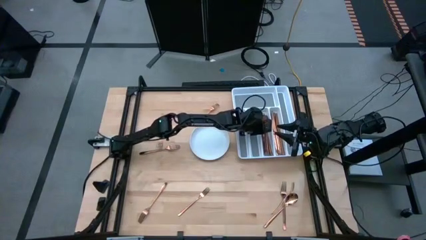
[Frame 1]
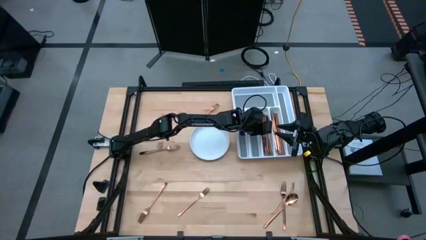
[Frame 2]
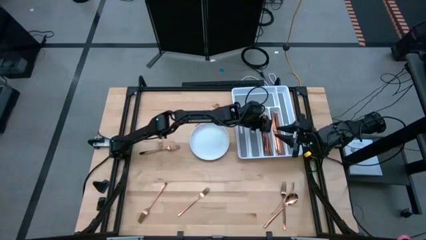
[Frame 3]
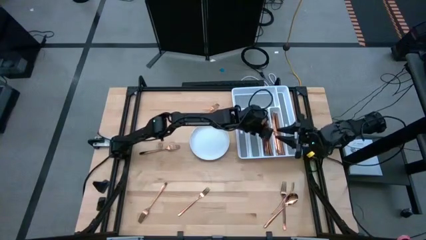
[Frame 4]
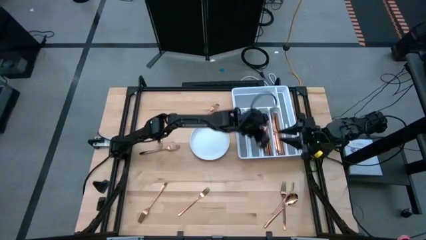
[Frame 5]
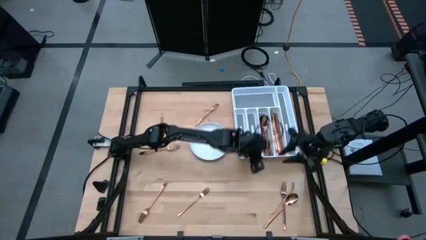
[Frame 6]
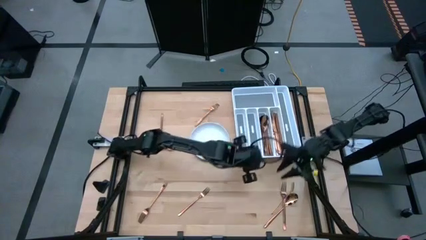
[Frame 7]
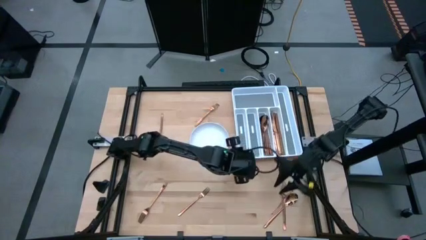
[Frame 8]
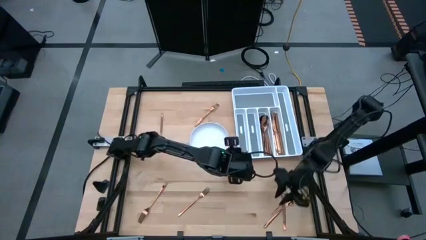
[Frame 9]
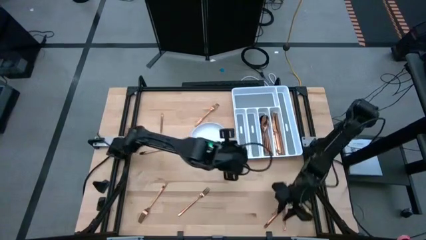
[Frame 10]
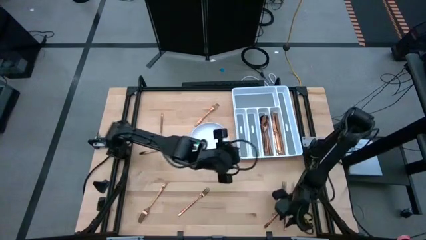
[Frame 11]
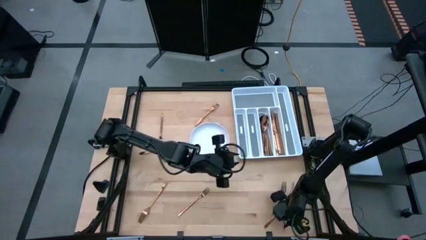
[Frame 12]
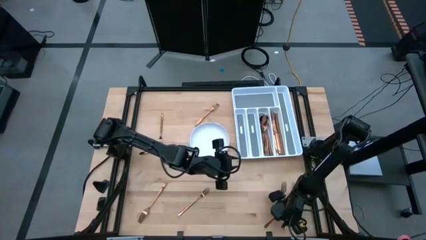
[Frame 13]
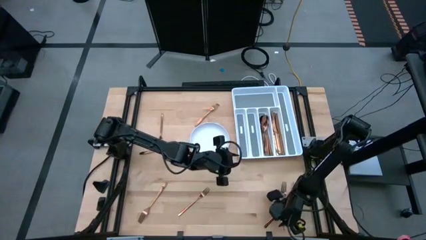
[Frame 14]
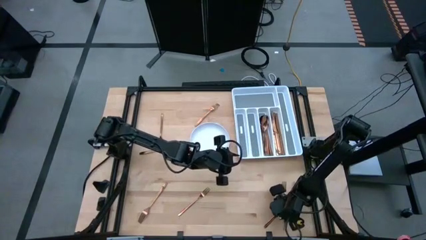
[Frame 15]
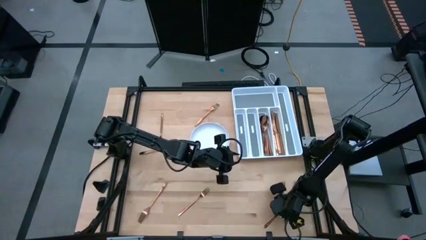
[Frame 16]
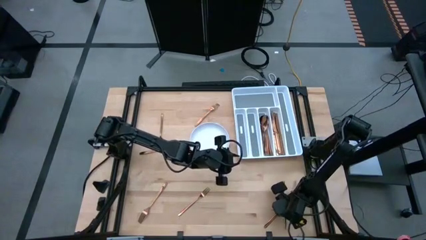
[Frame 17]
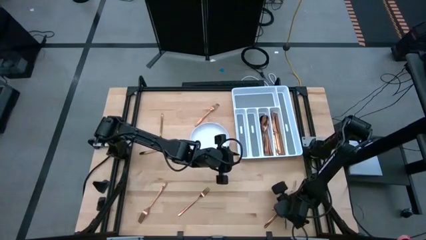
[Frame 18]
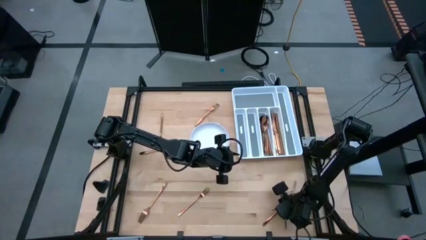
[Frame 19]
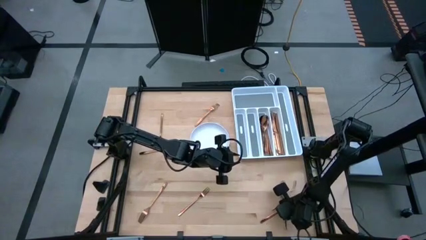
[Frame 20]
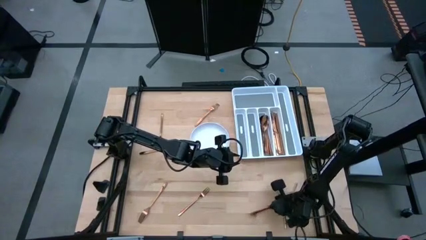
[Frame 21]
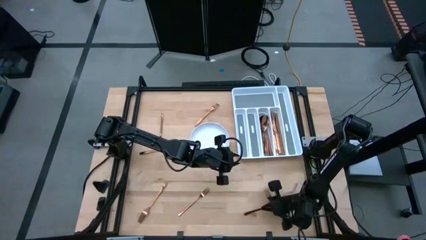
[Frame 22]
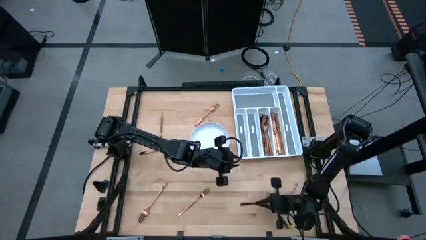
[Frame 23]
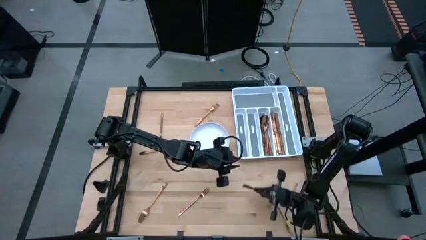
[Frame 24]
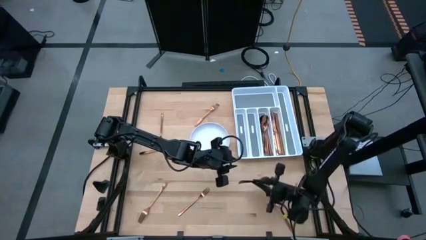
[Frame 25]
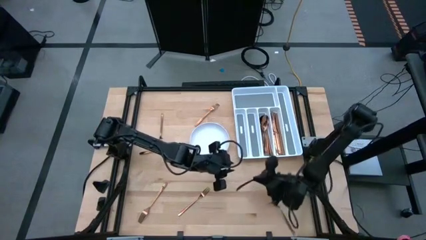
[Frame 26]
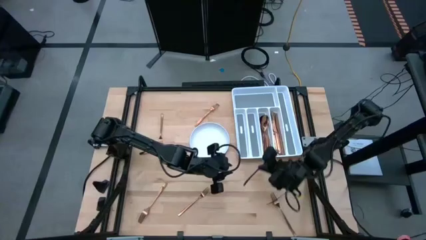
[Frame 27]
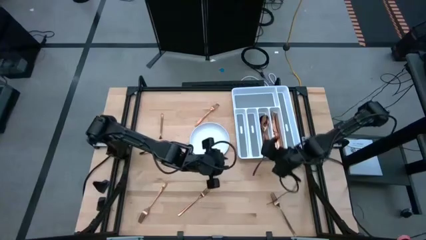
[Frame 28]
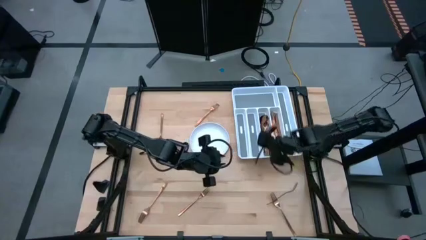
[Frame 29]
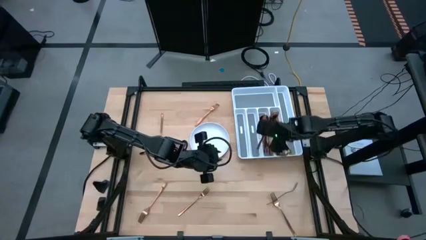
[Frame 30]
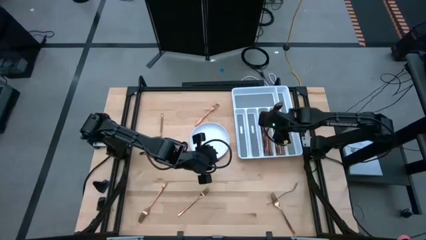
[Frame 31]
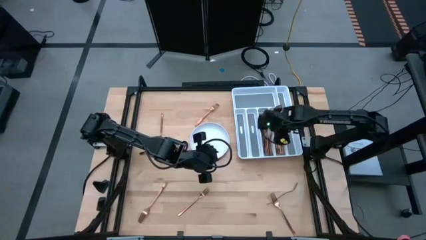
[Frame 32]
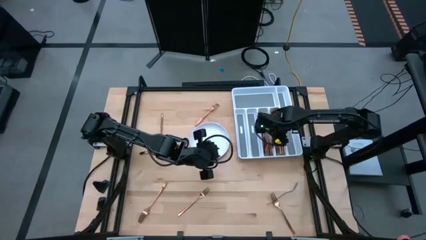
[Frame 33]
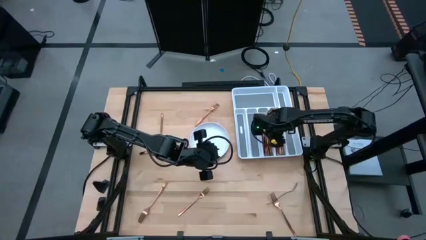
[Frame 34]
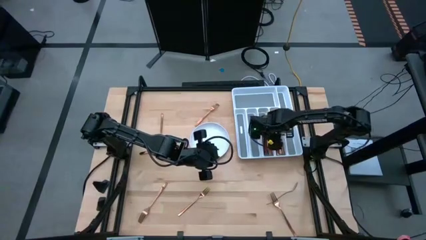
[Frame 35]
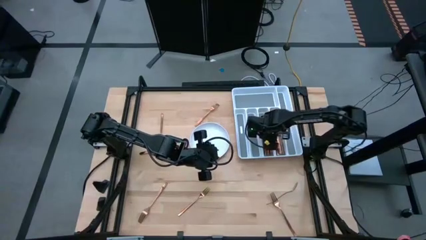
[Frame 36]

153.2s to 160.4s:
Task: Sort silverware
Put the spoon in the silverware tray

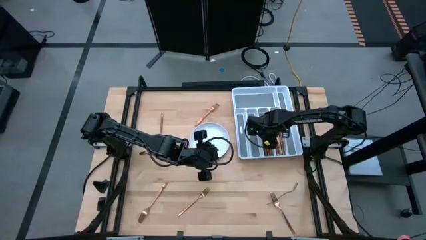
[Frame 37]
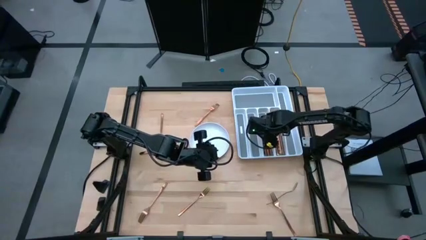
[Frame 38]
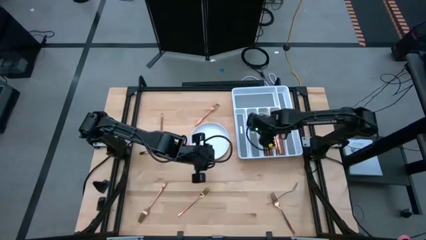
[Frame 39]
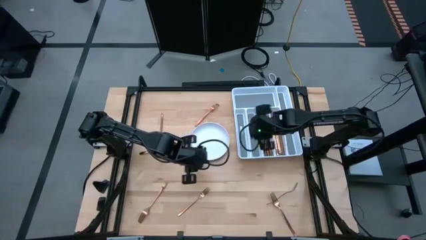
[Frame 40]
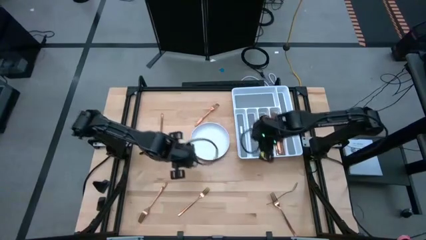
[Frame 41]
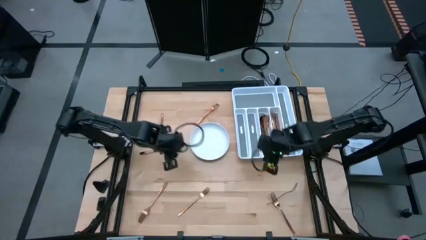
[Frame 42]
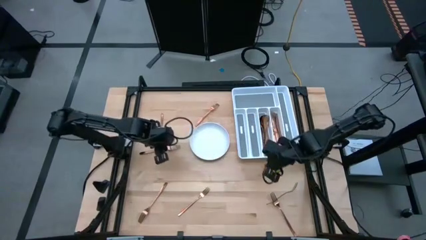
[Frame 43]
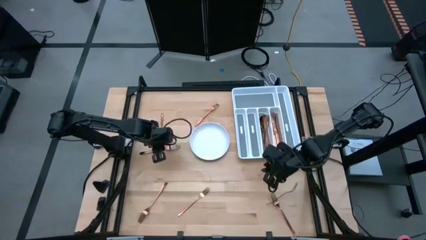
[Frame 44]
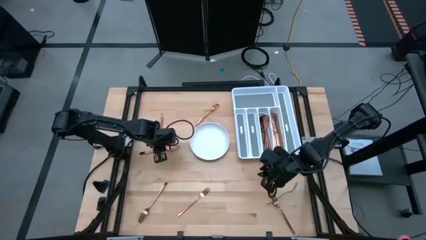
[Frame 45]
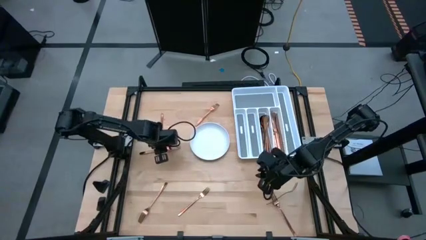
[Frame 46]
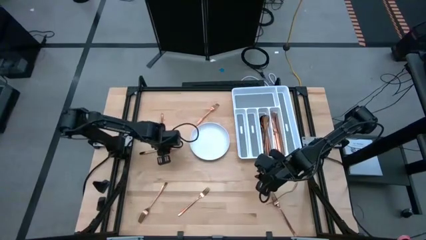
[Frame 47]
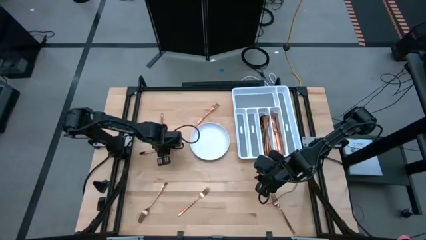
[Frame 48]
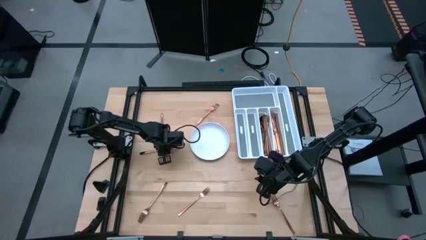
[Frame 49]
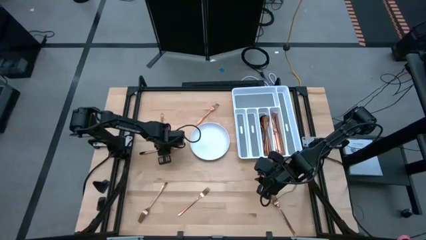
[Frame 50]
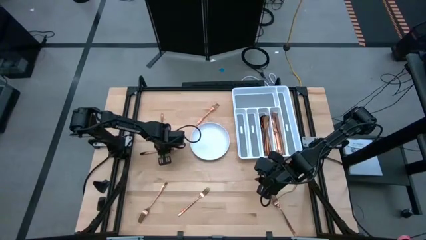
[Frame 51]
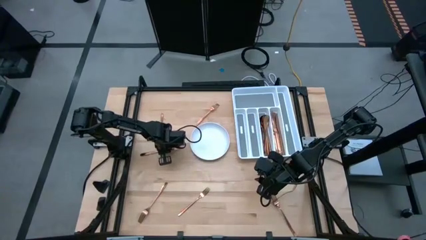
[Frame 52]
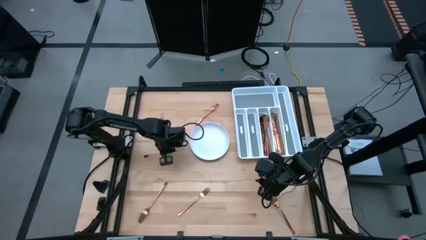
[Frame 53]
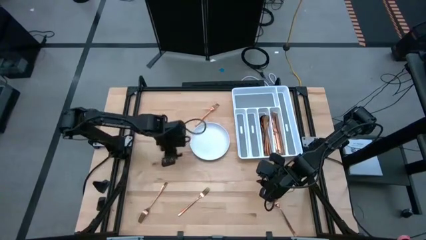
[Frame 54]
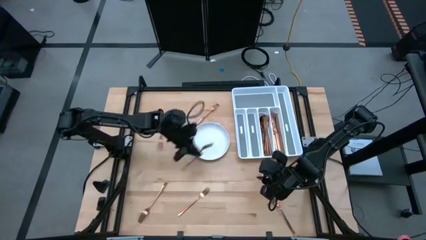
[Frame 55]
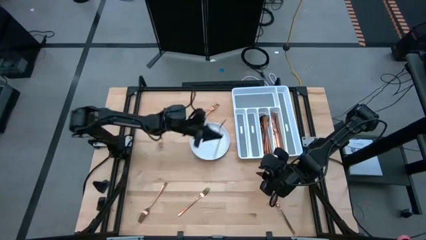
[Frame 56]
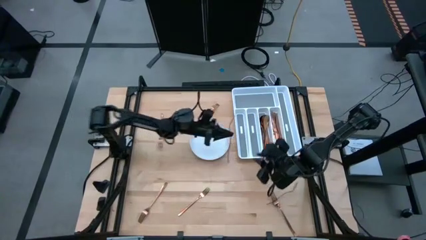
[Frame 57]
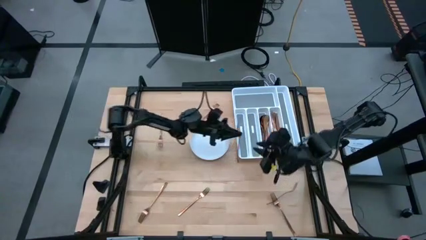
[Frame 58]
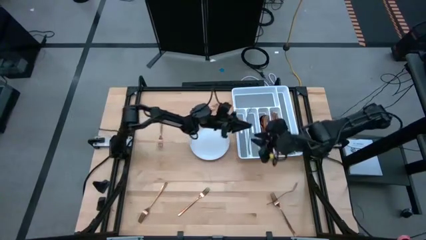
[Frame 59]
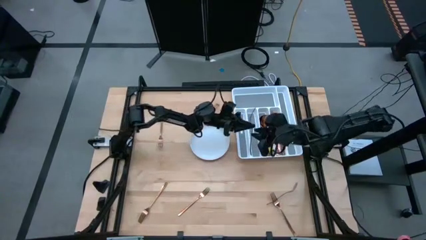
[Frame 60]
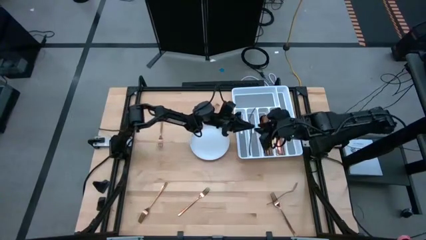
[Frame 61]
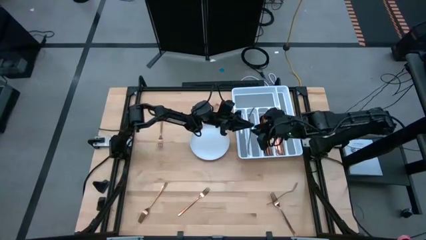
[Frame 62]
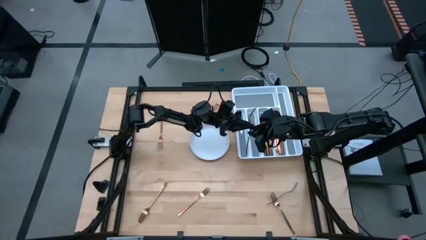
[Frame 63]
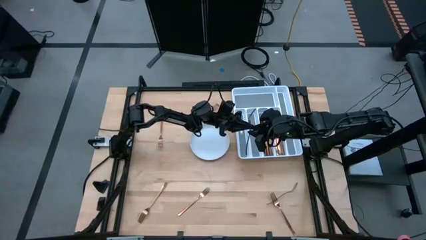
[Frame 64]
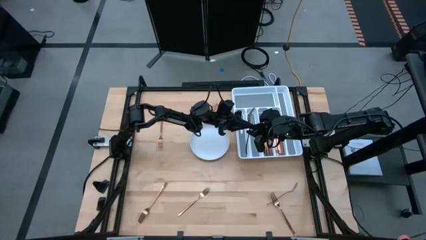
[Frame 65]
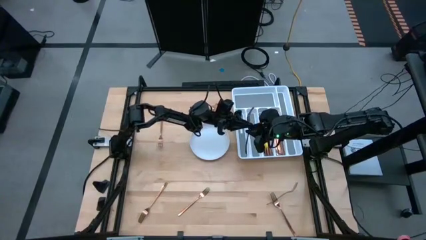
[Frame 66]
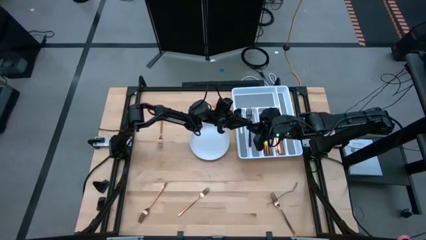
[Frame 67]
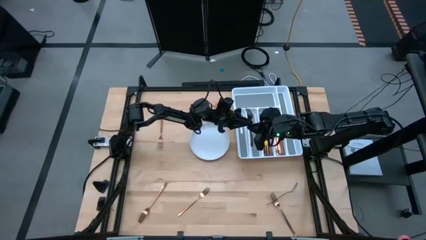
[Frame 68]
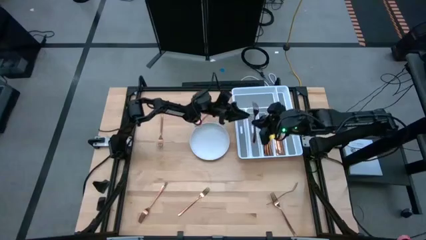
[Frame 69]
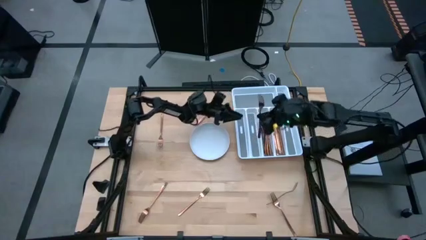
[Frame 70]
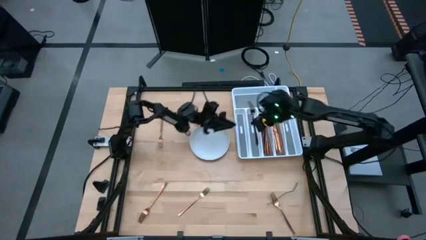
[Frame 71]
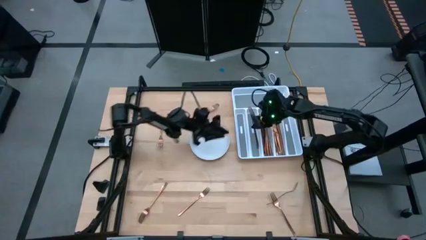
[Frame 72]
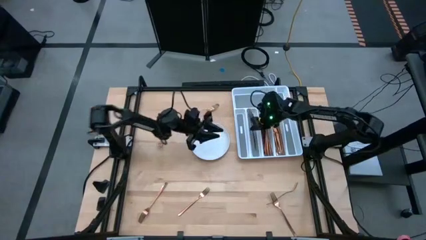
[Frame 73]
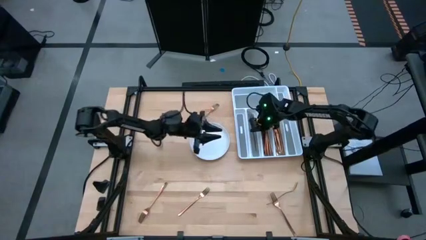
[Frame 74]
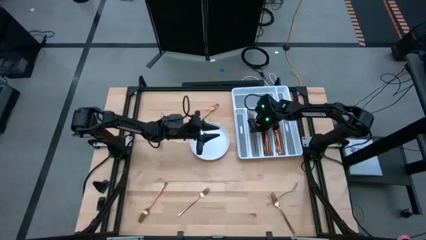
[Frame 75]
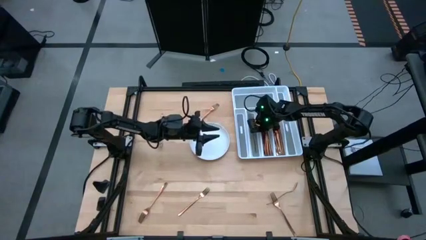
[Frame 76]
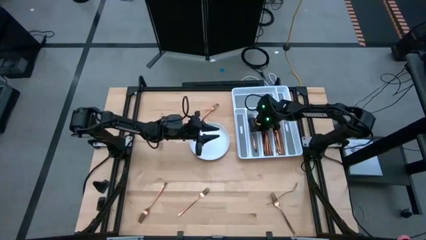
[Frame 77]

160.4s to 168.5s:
Put the fork in the silverware tray

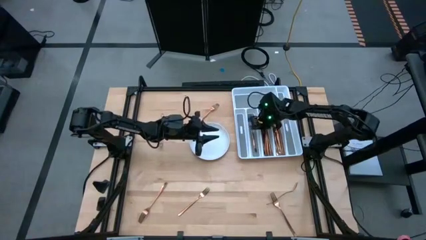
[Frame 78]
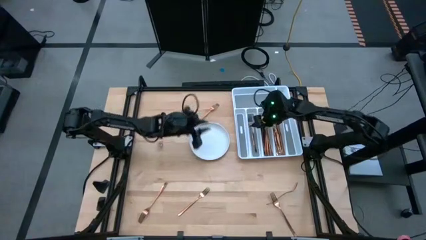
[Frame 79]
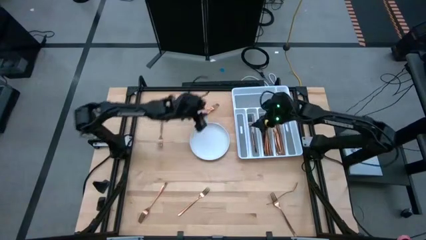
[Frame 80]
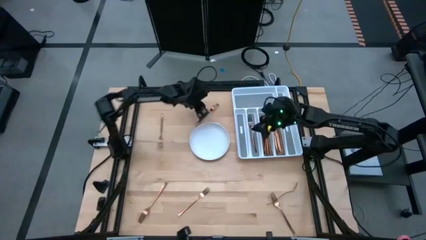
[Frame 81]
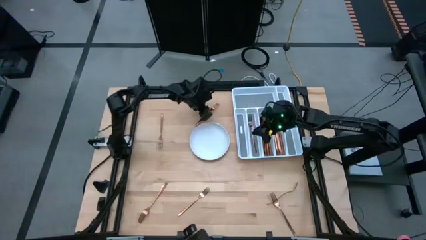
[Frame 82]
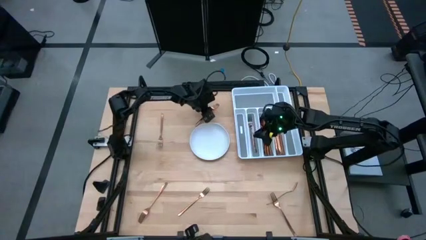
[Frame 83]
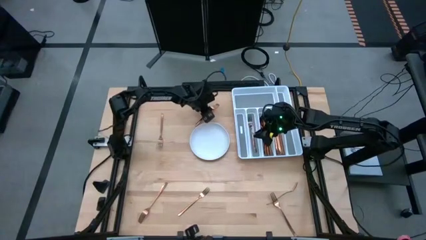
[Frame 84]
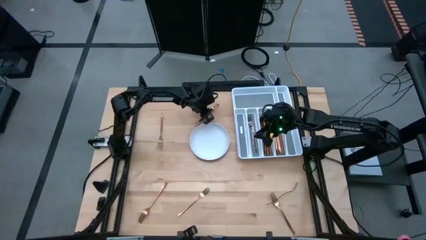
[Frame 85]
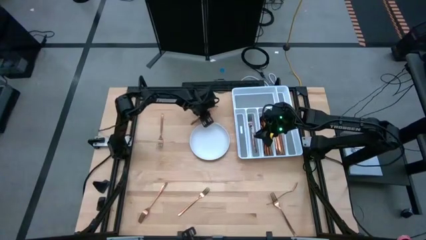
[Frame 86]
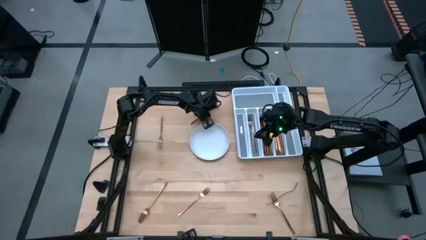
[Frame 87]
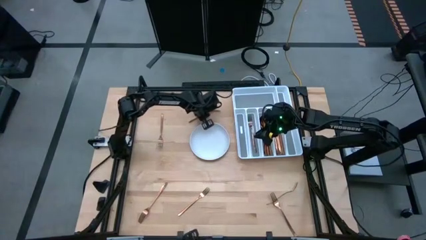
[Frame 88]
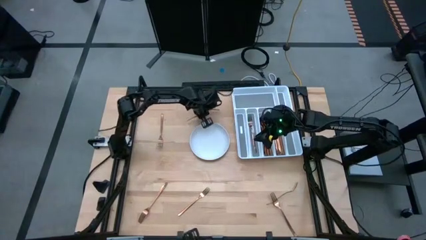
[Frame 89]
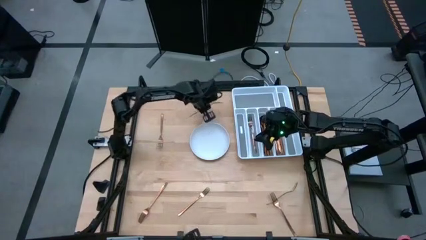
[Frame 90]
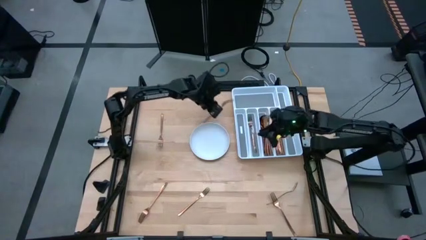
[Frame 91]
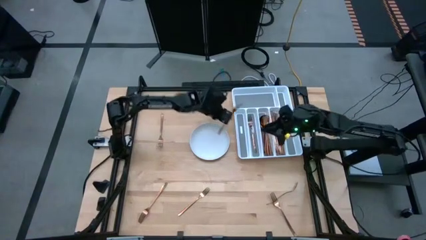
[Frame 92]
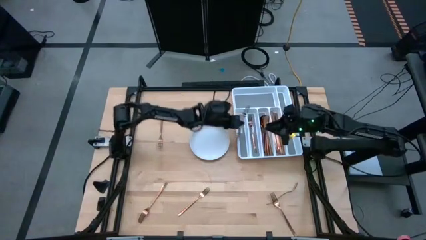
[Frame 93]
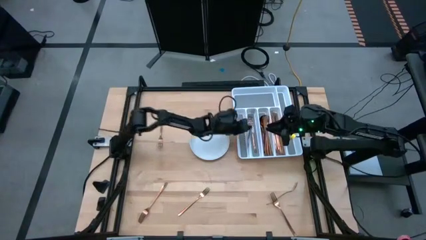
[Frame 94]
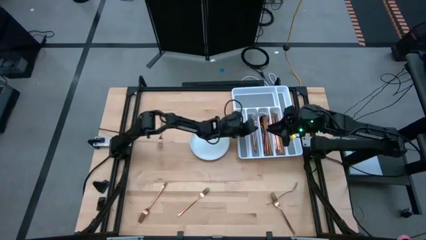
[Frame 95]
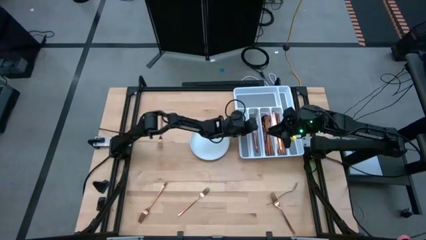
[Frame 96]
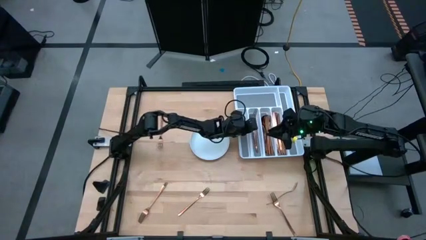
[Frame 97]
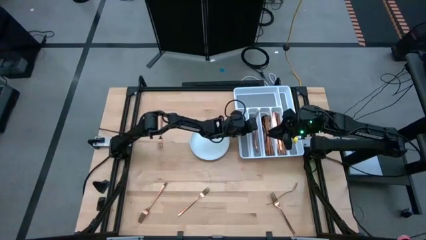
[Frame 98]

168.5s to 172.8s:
Put the fork in the silverware tray
